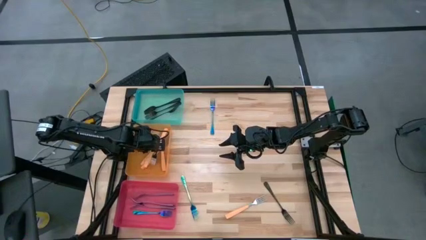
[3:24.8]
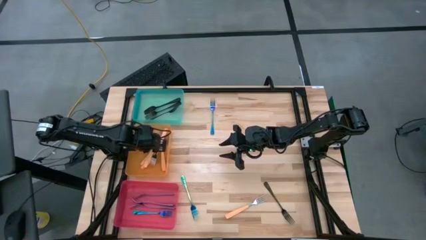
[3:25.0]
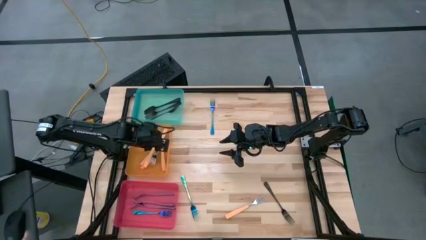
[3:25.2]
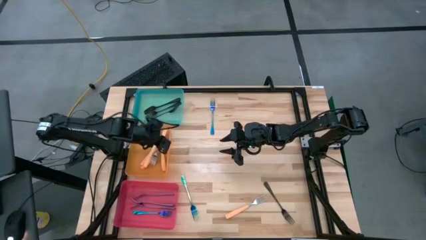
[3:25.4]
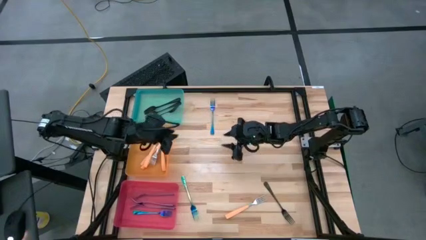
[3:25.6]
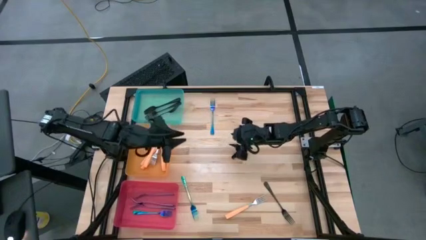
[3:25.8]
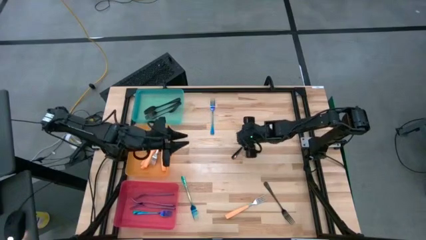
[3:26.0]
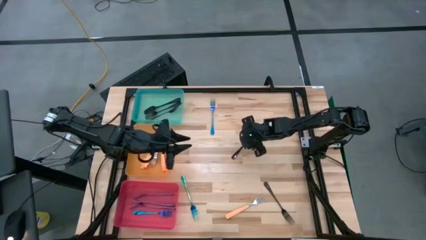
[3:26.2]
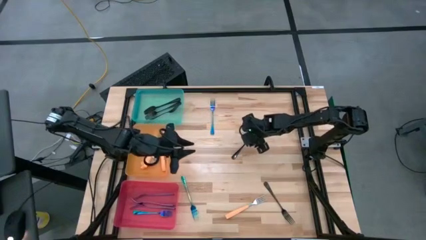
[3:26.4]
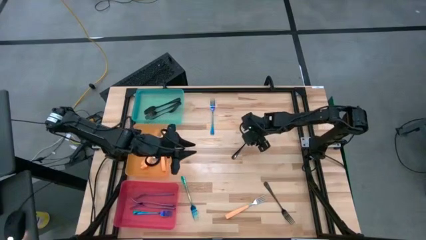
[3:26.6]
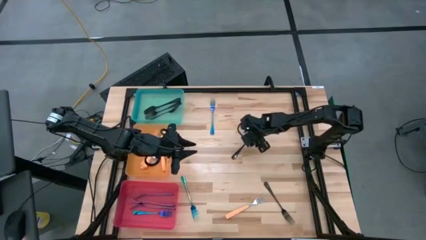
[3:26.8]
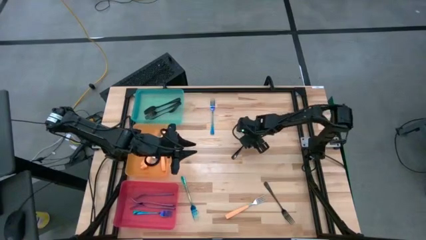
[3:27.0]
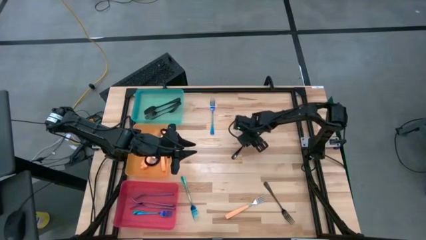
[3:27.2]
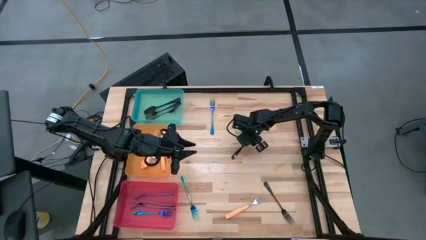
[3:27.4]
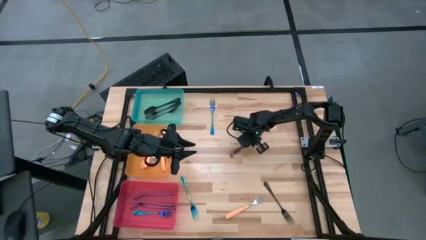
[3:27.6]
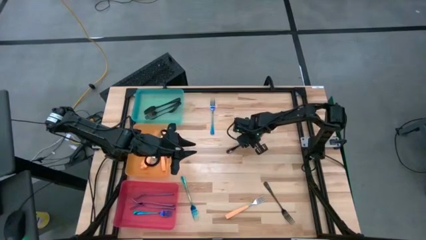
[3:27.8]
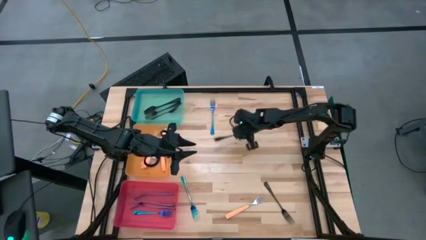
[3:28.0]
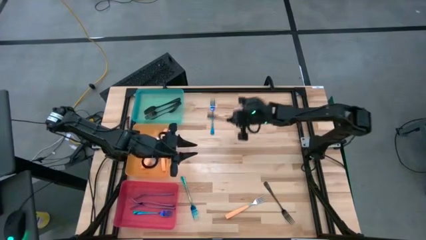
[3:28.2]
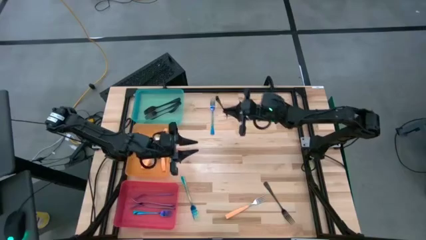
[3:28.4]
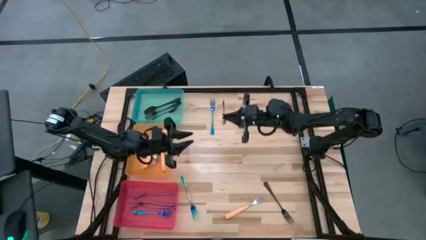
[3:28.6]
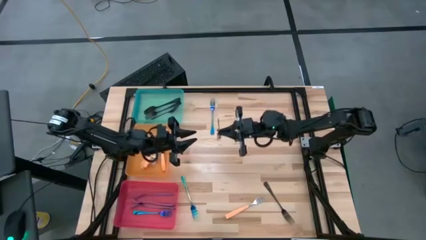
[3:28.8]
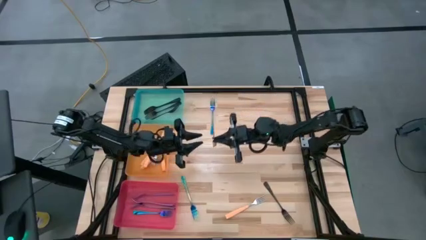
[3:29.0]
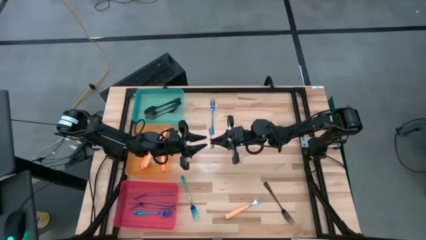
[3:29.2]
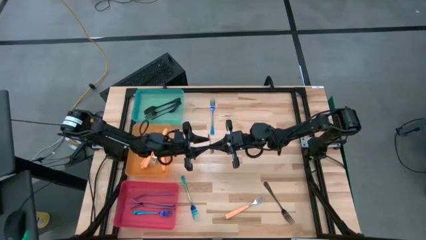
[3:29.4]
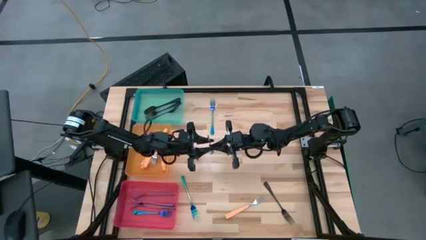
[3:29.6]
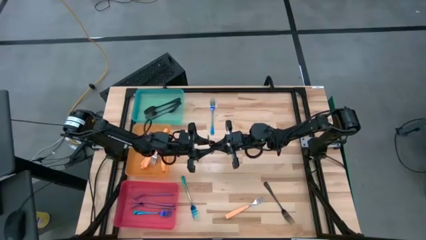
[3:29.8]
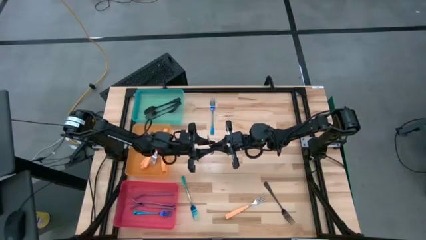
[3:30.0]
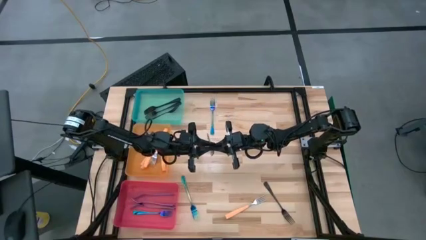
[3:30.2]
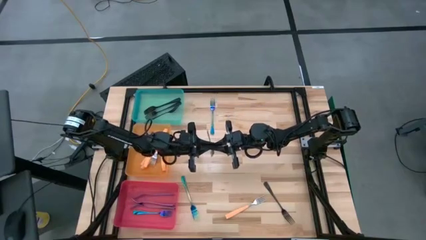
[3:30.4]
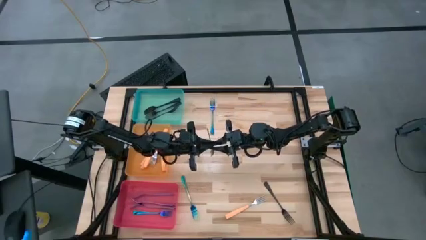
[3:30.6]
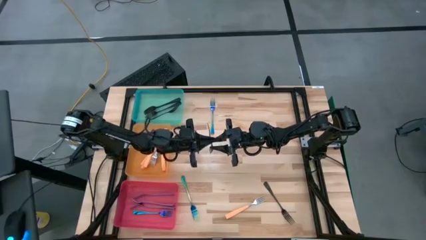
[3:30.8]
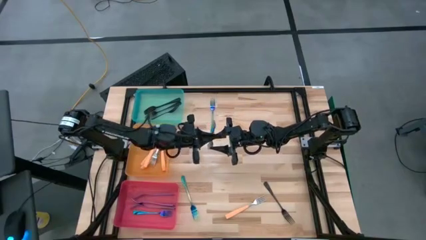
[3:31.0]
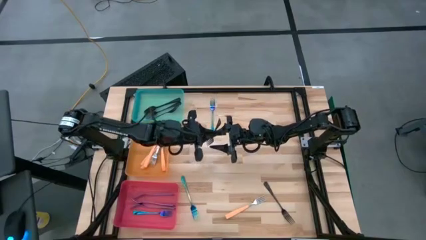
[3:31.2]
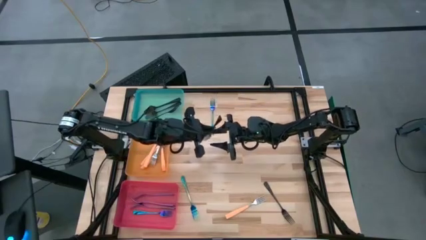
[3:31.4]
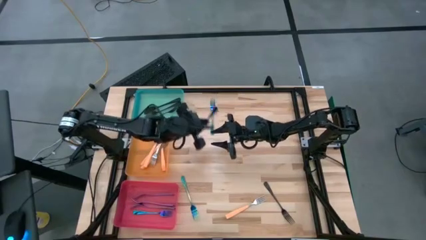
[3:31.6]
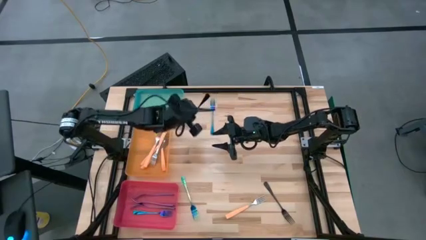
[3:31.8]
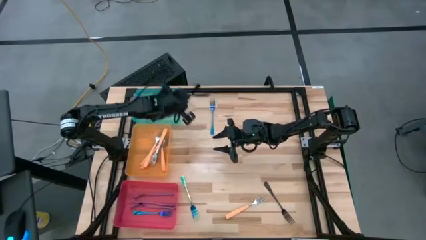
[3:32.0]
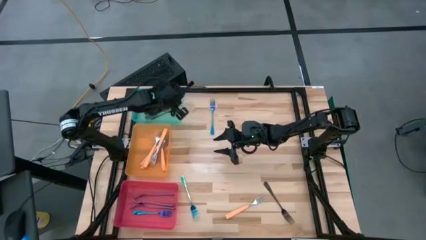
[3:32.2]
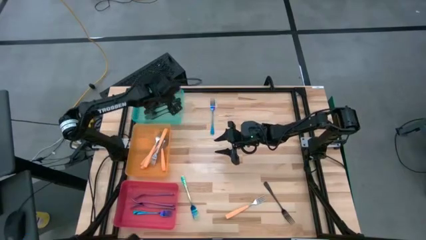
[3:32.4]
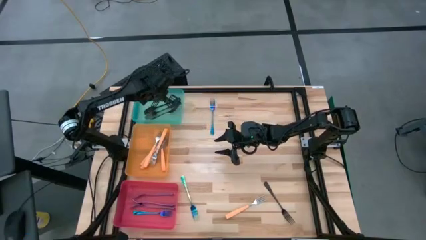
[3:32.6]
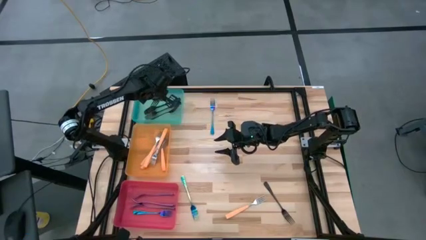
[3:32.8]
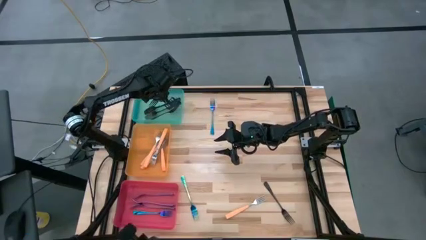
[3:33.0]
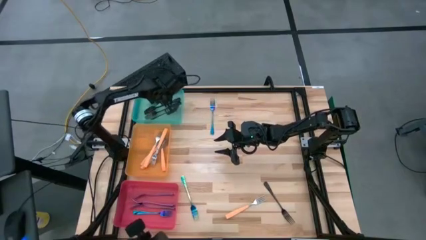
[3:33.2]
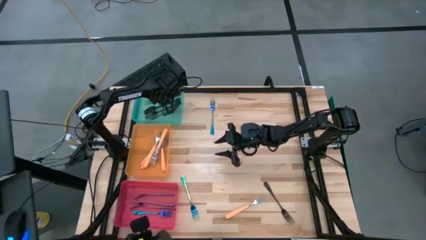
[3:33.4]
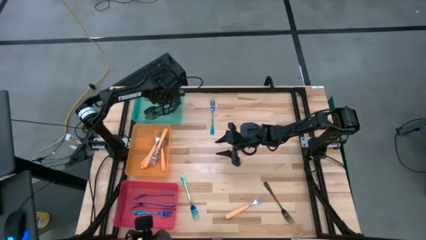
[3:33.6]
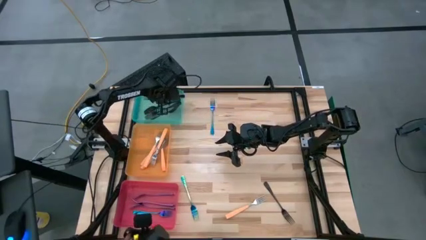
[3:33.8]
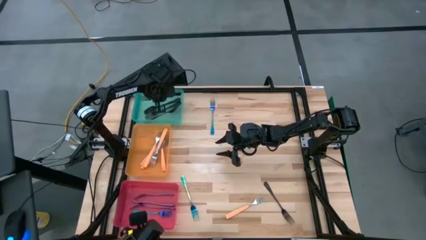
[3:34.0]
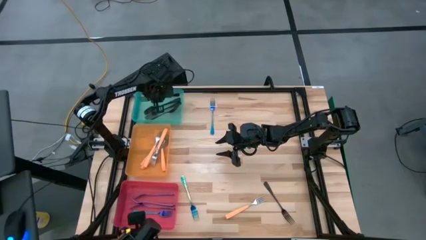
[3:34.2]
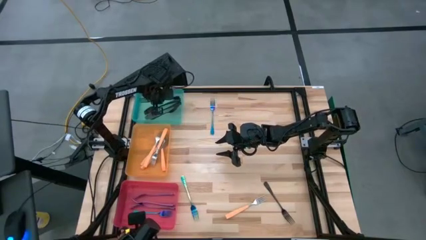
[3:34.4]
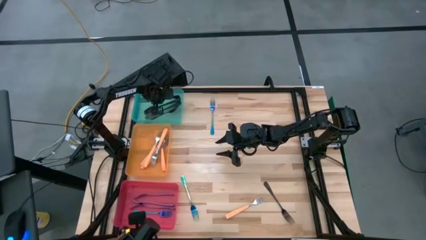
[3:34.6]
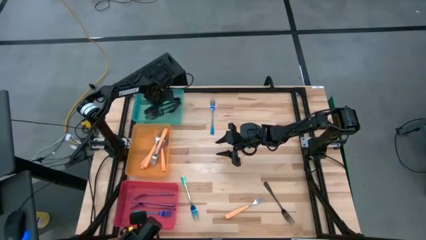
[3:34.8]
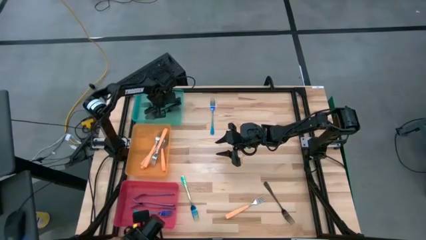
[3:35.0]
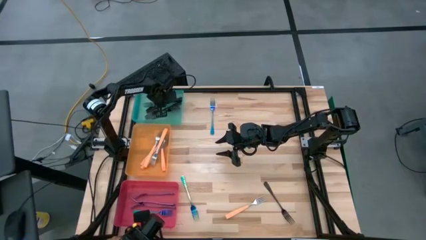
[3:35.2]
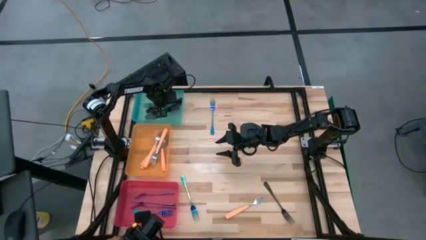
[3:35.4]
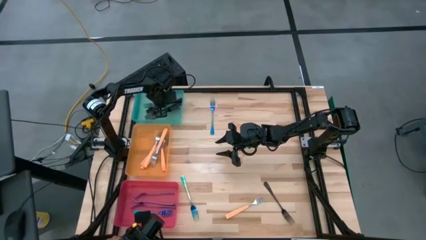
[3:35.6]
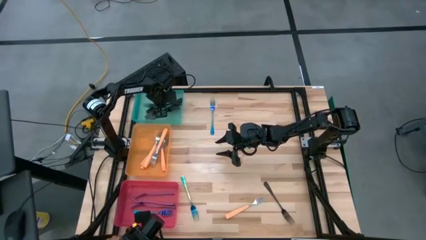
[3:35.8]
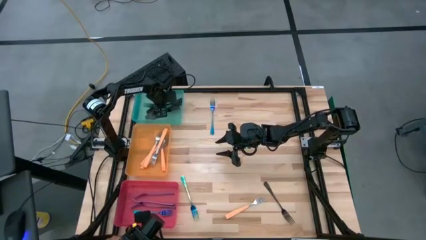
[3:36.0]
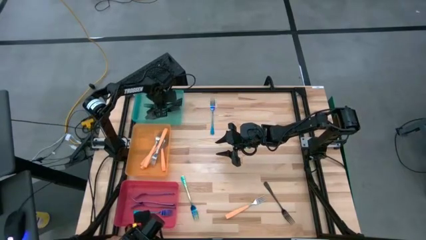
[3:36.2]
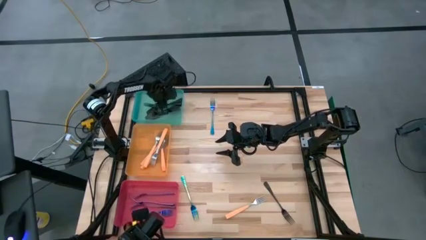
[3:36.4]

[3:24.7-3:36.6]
Task: Sort silverware by color (type)
Put the black fork into the blue bin
